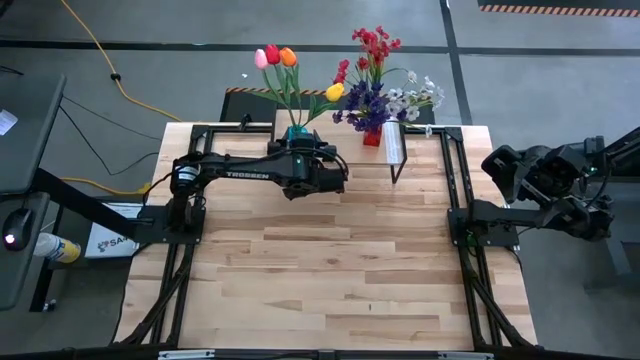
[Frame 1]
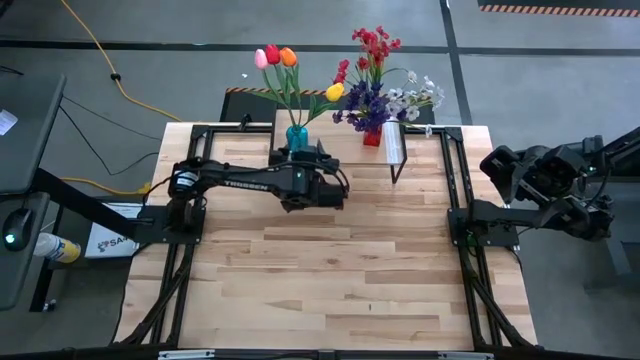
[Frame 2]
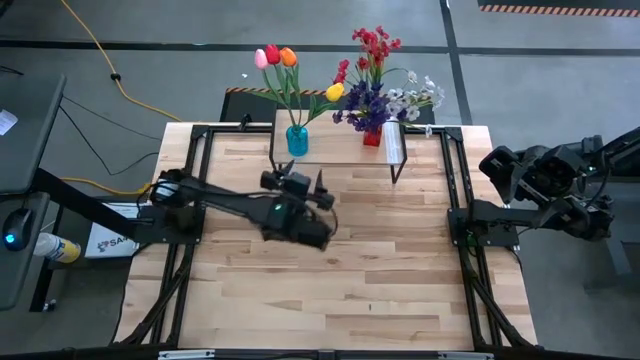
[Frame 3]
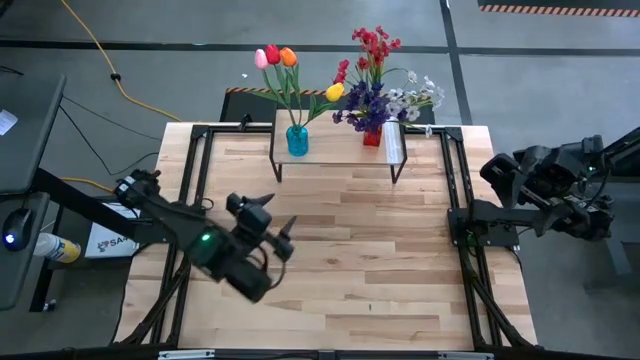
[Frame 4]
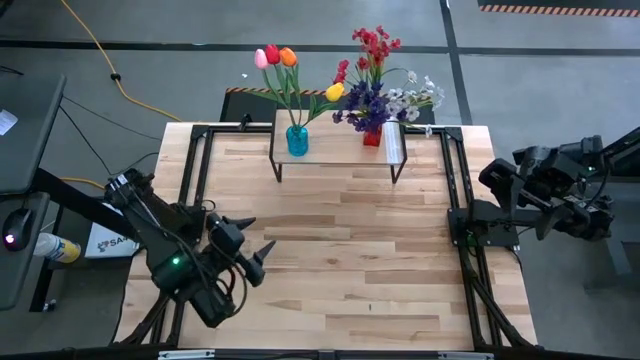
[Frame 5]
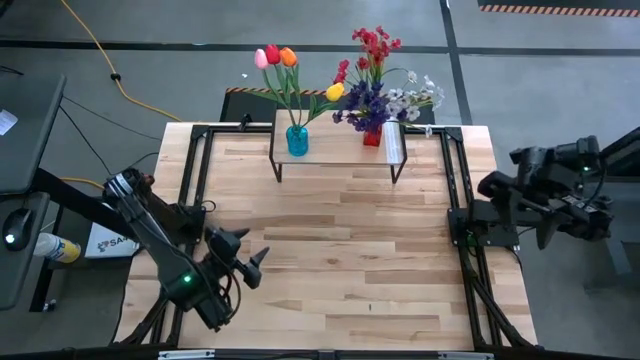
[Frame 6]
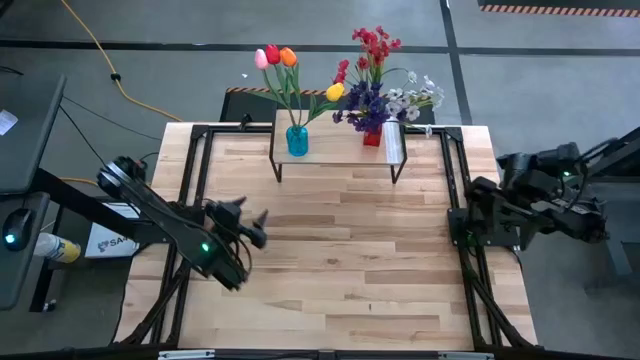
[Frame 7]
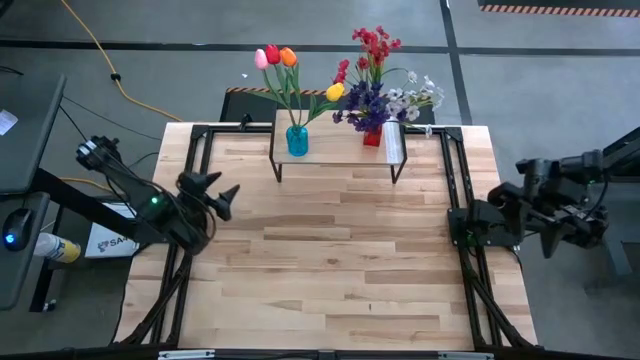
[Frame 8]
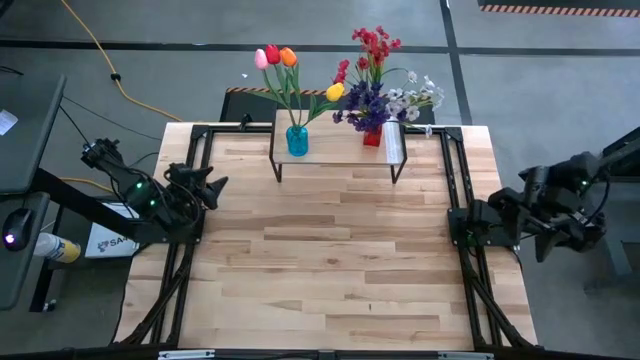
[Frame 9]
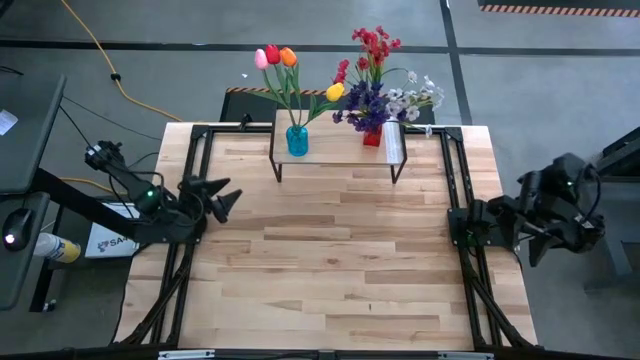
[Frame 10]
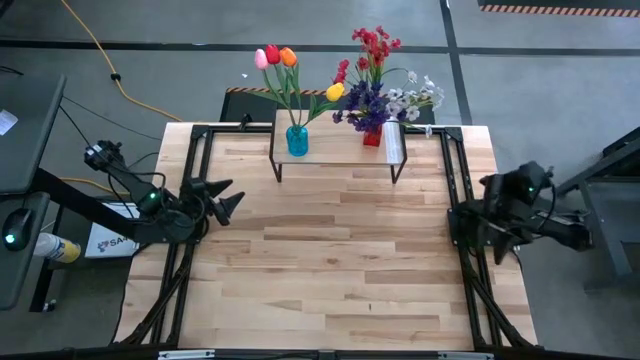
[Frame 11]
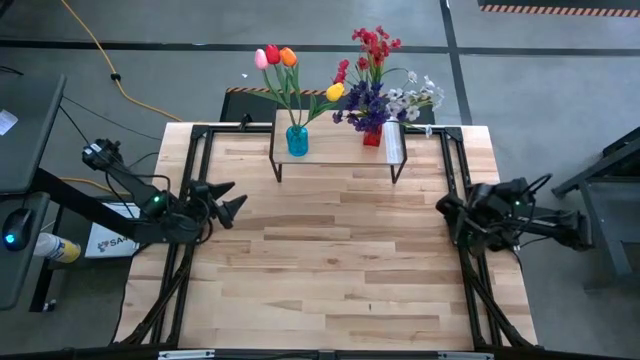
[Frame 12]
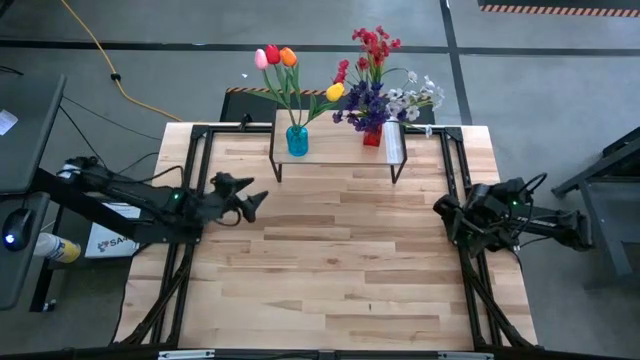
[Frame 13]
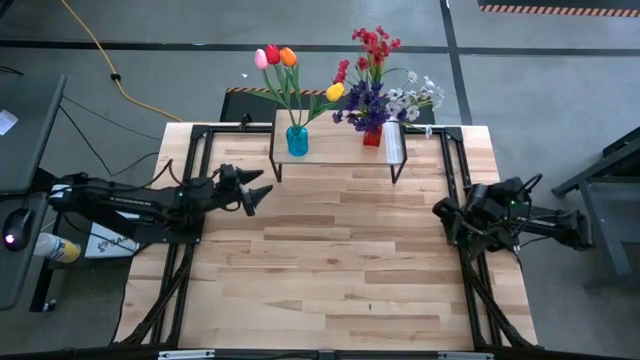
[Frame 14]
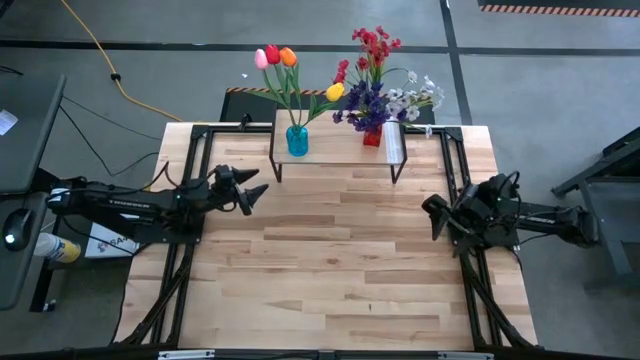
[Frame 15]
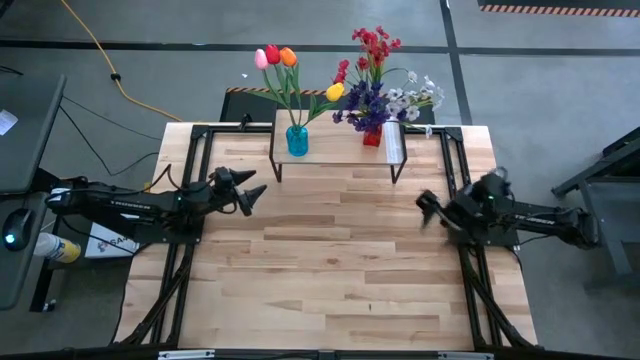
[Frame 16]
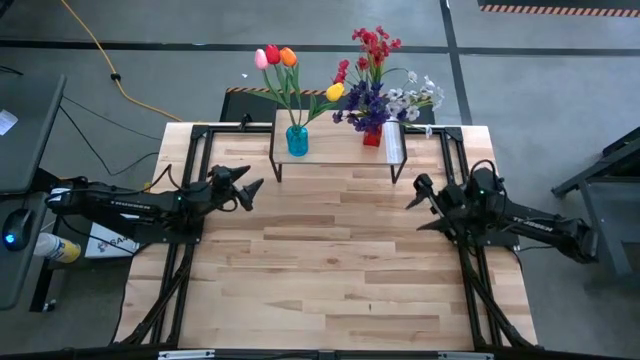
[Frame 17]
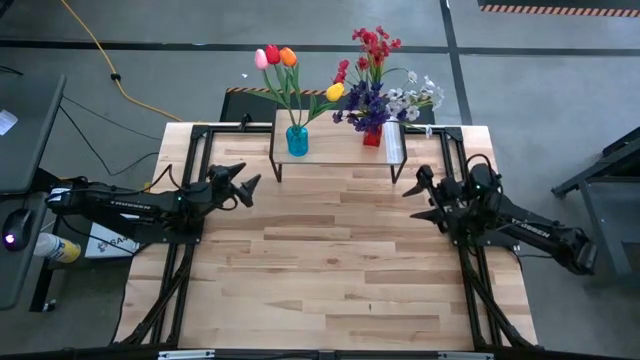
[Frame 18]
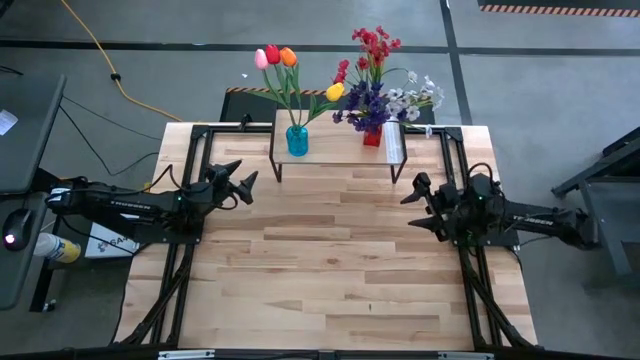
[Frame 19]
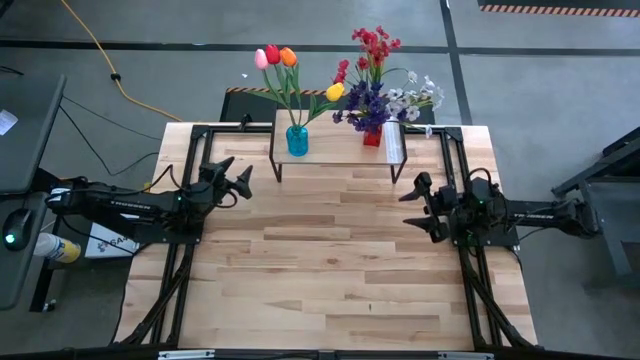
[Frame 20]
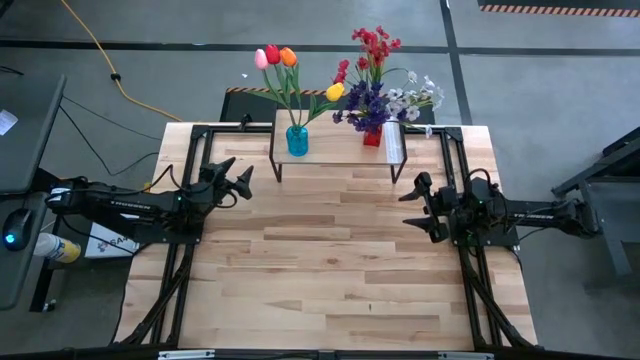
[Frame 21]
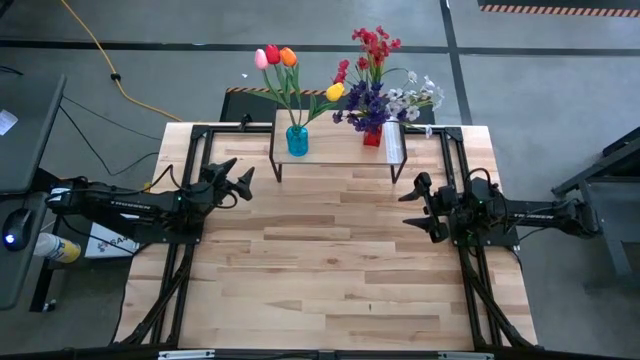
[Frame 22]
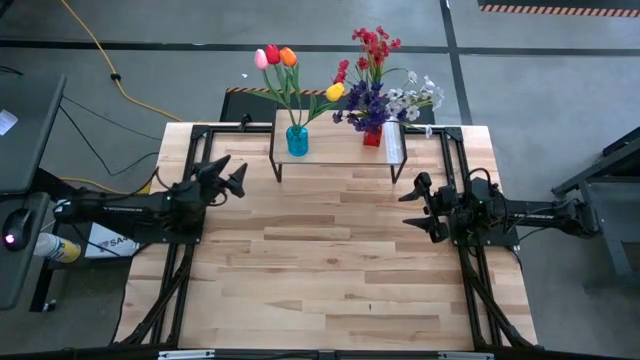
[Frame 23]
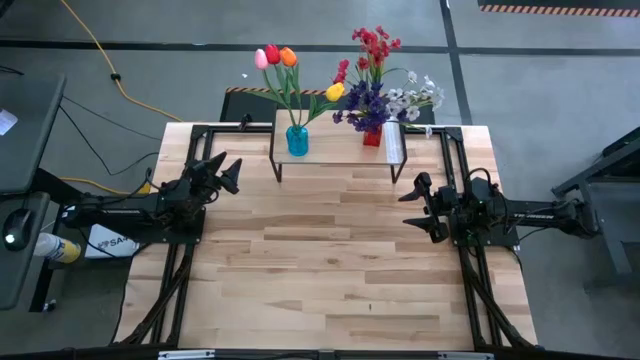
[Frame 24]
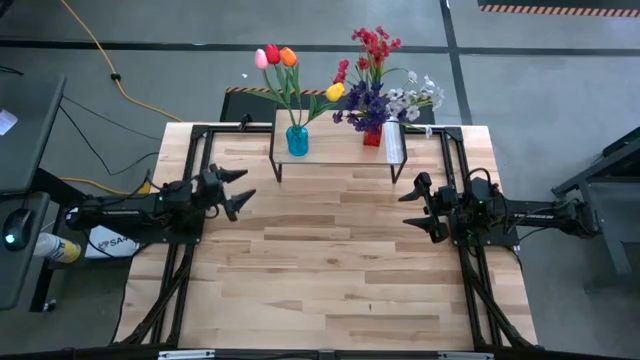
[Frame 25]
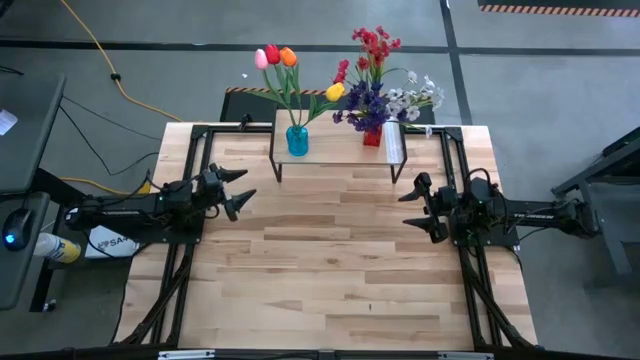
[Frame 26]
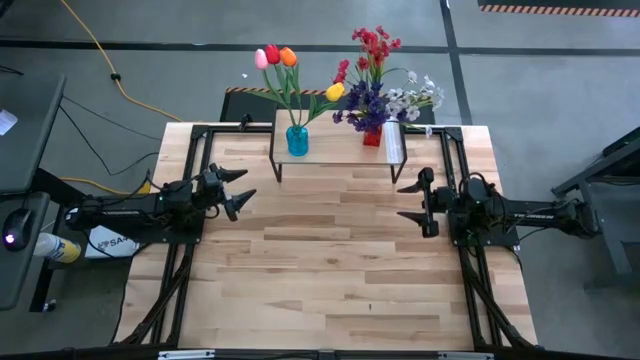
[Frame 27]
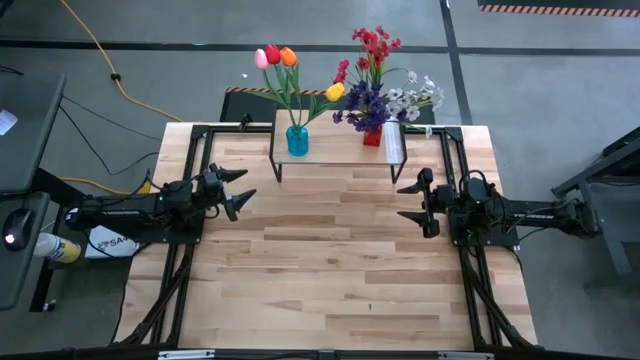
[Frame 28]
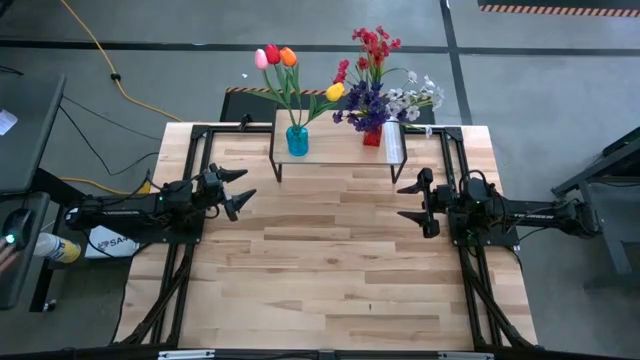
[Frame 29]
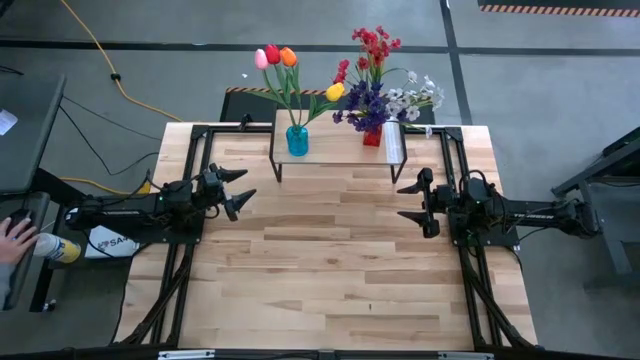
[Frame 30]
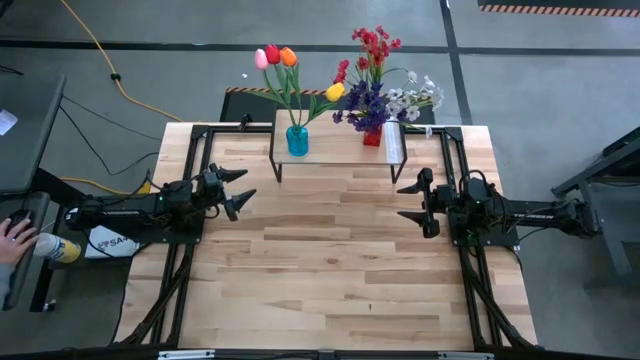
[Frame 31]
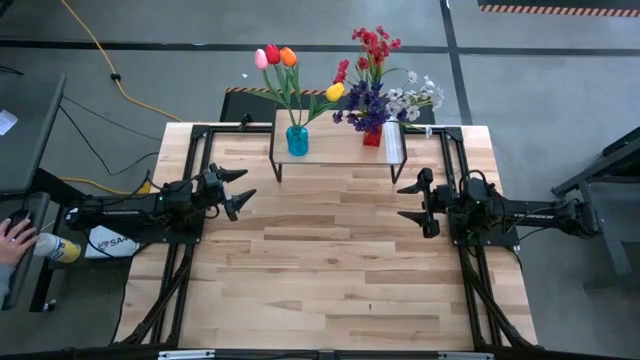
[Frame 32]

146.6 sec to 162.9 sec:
Task: Pick and place flowers into a vace then onto a shelf
Return to Home Position

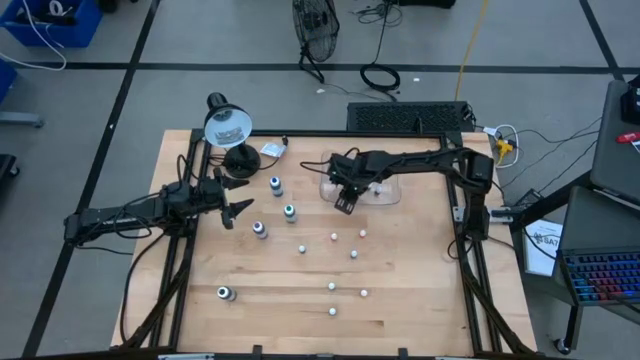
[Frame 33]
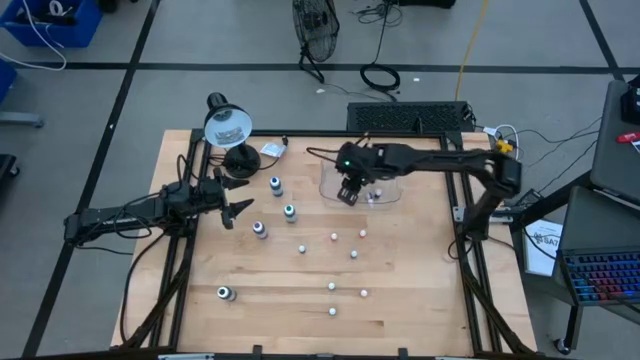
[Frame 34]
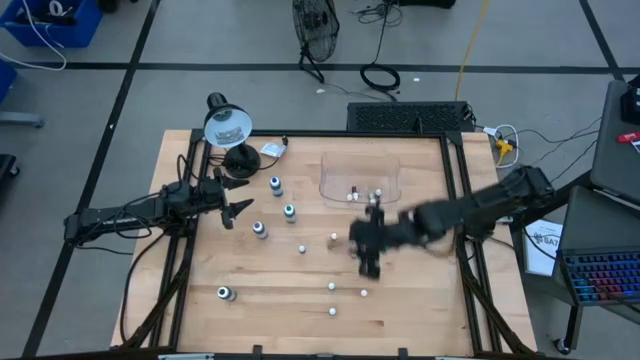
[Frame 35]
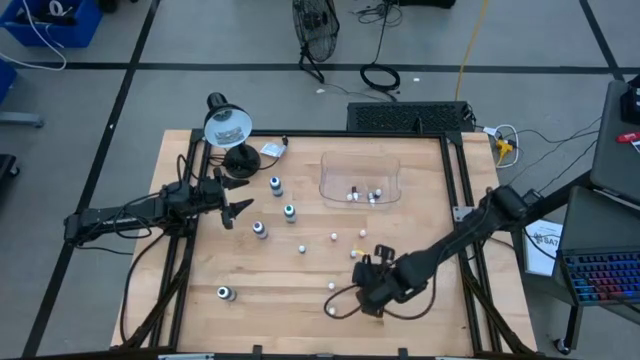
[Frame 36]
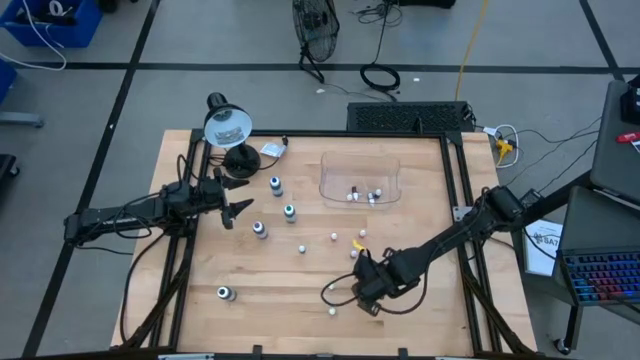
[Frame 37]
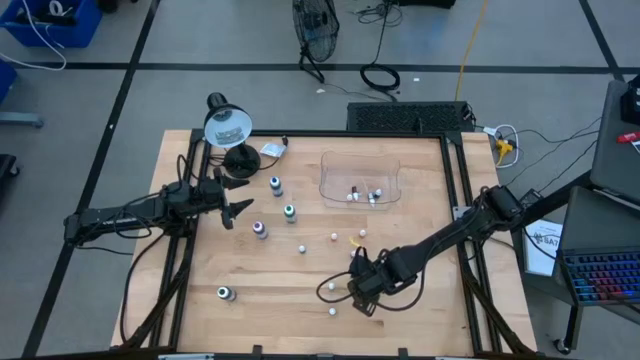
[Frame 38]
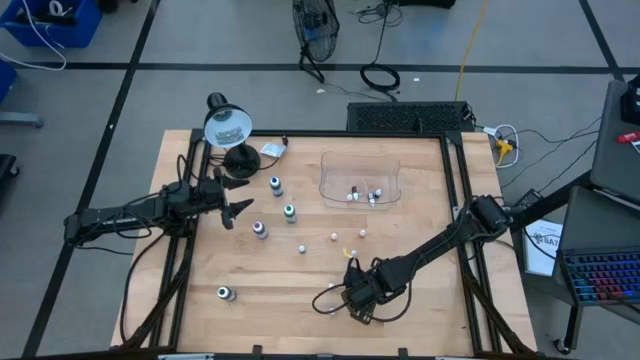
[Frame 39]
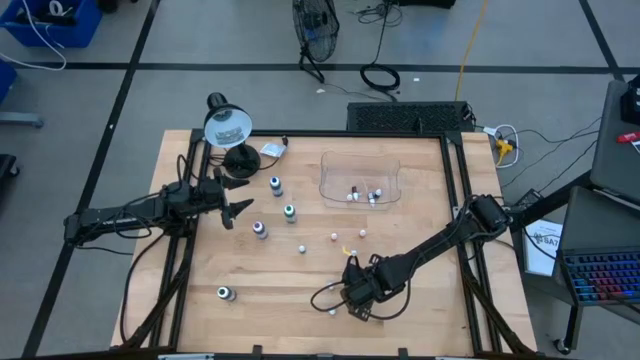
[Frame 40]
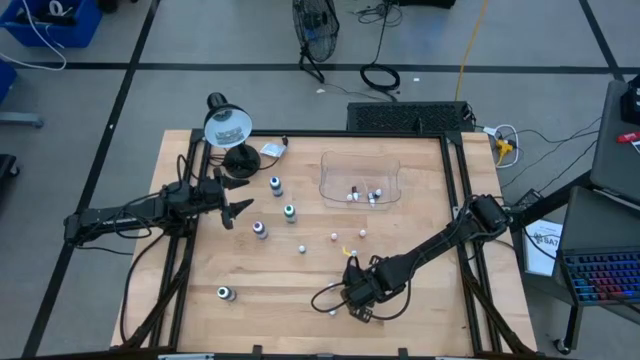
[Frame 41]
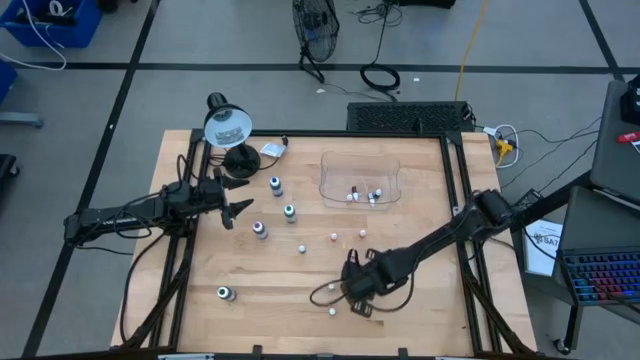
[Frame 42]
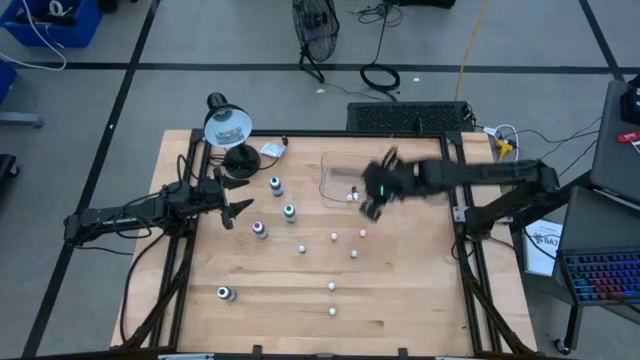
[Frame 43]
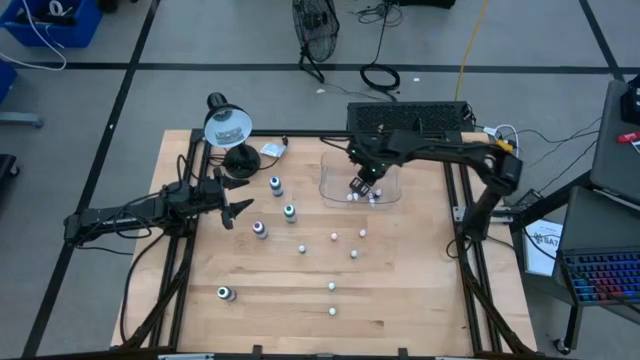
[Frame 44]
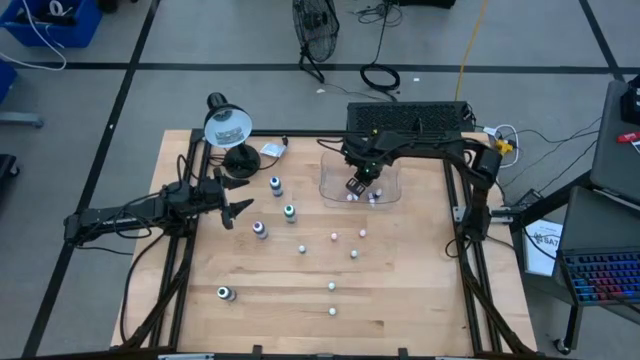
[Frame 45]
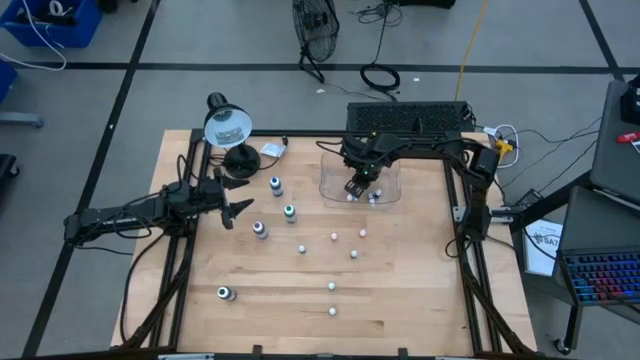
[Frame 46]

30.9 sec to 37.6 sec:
Task: Pick & Place food coloring
Put the orange food coloring into the transparent bin
